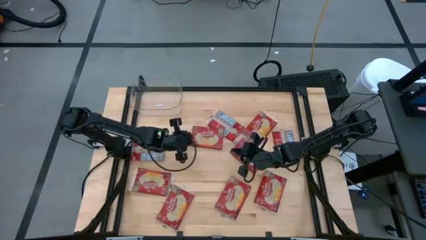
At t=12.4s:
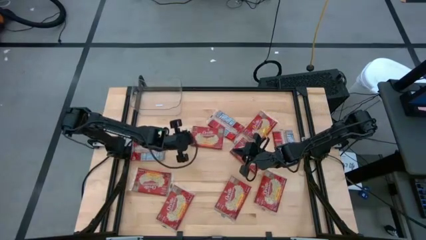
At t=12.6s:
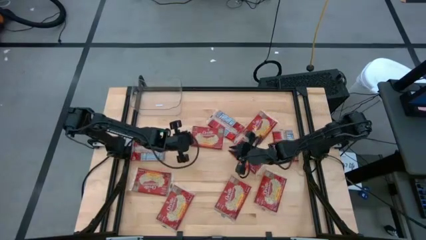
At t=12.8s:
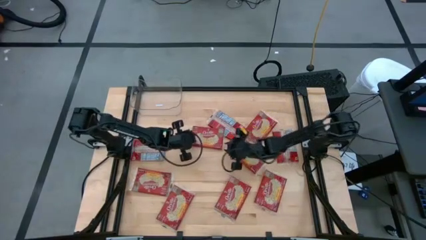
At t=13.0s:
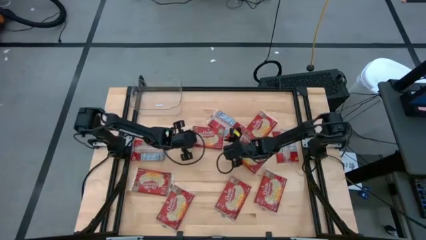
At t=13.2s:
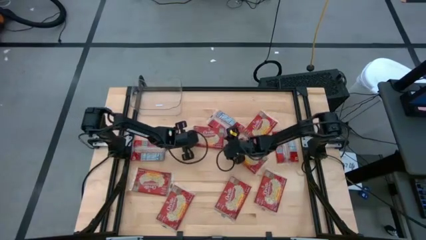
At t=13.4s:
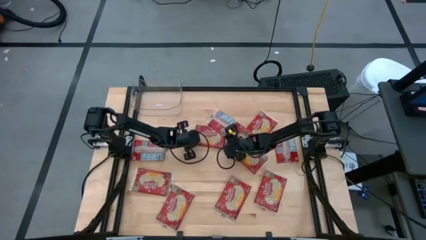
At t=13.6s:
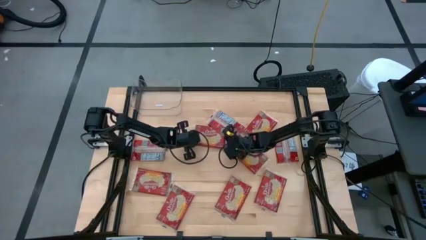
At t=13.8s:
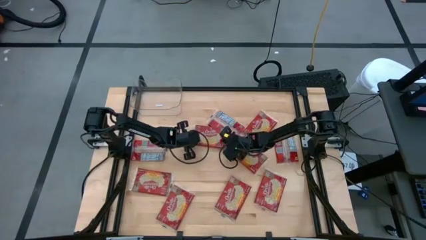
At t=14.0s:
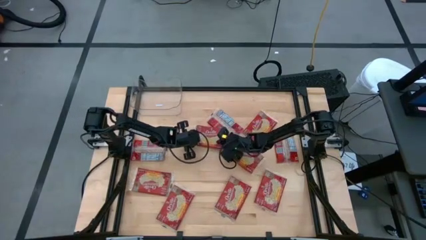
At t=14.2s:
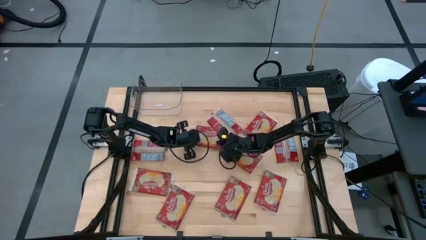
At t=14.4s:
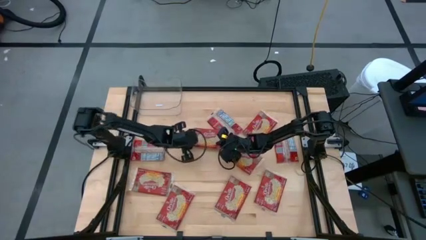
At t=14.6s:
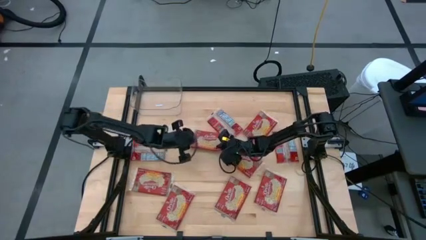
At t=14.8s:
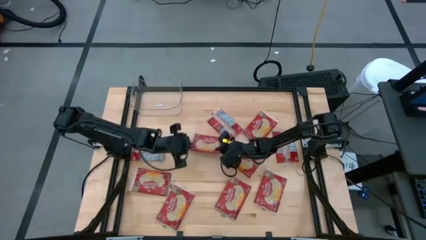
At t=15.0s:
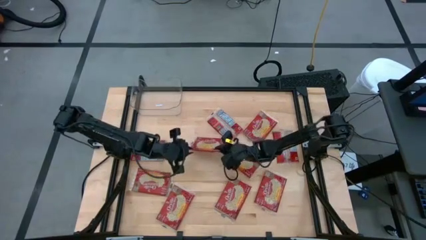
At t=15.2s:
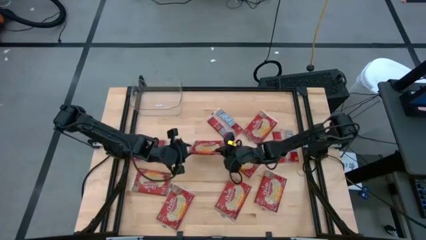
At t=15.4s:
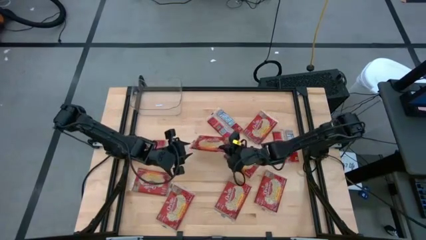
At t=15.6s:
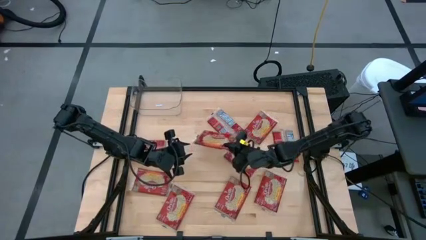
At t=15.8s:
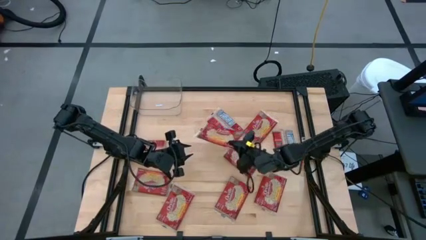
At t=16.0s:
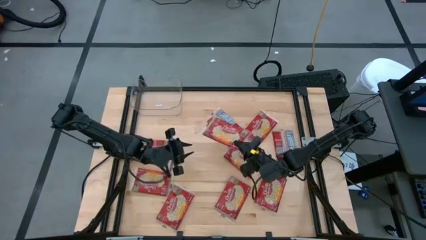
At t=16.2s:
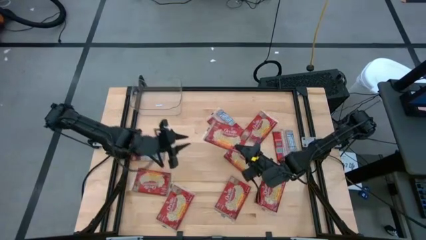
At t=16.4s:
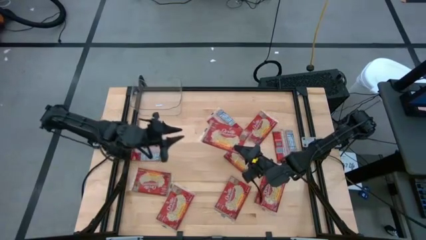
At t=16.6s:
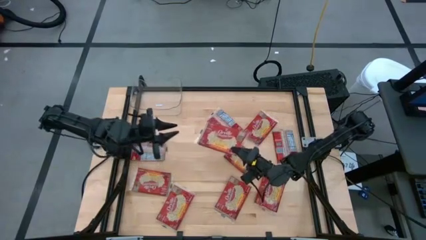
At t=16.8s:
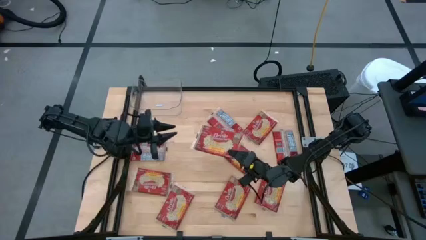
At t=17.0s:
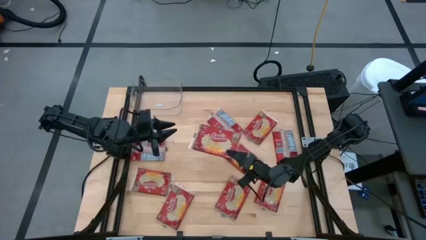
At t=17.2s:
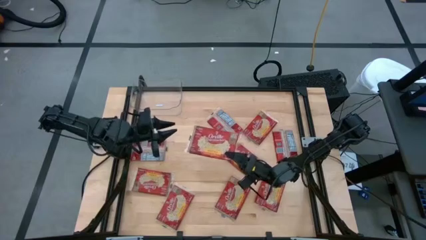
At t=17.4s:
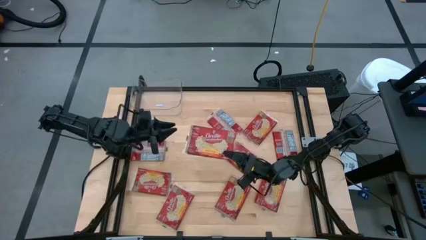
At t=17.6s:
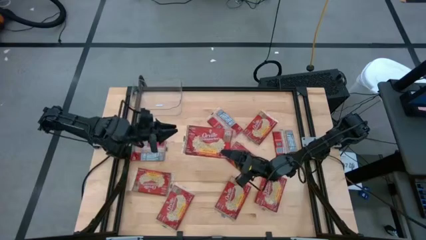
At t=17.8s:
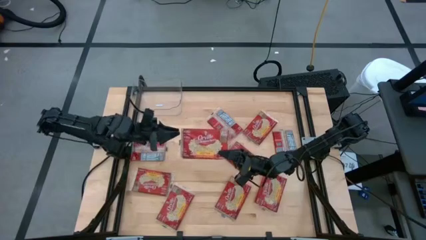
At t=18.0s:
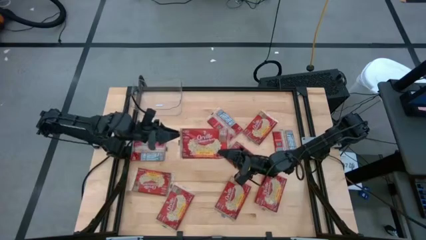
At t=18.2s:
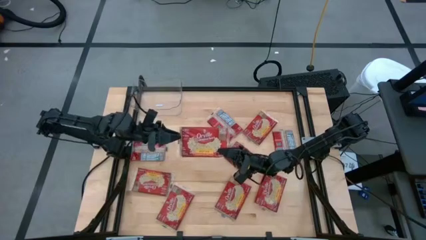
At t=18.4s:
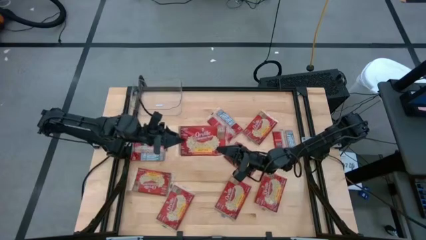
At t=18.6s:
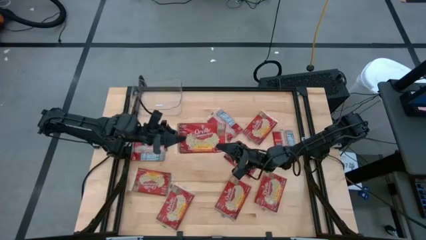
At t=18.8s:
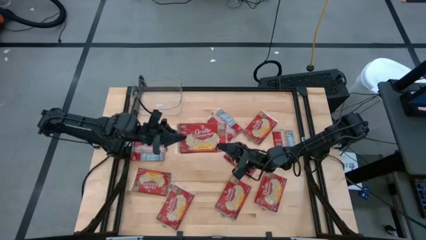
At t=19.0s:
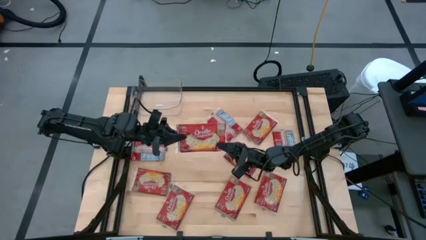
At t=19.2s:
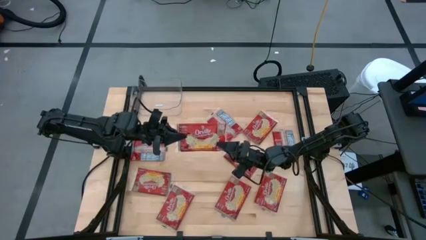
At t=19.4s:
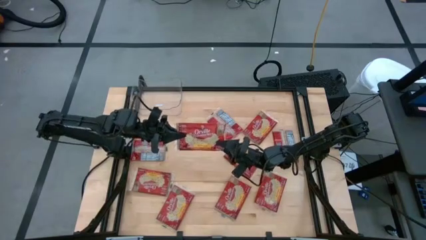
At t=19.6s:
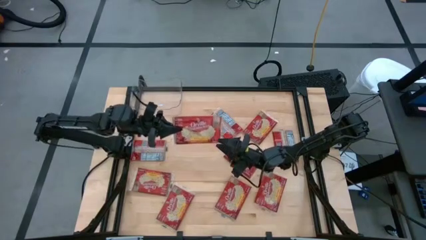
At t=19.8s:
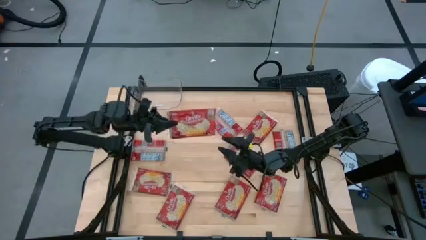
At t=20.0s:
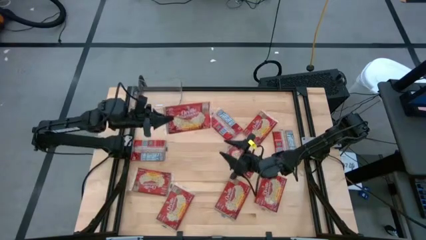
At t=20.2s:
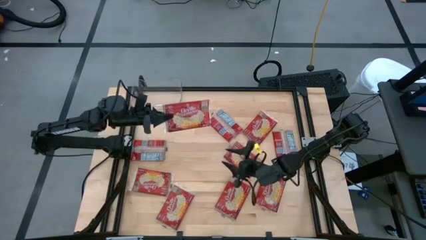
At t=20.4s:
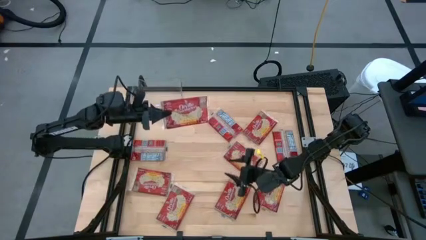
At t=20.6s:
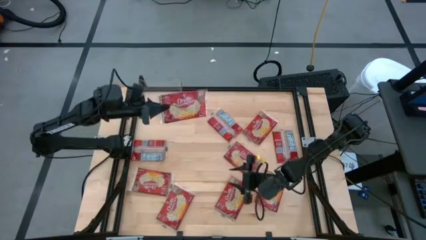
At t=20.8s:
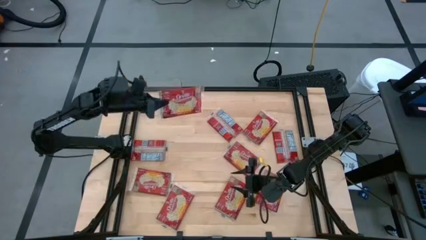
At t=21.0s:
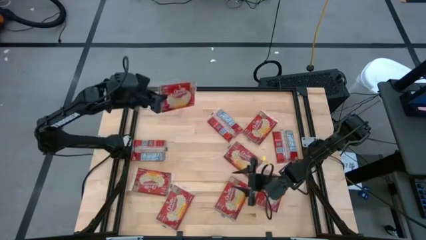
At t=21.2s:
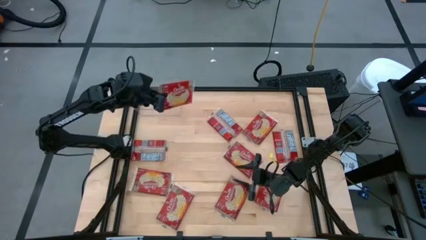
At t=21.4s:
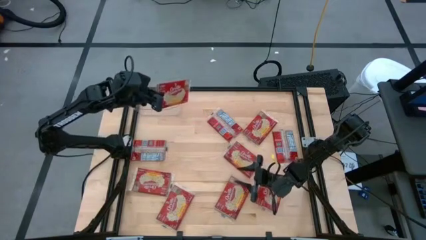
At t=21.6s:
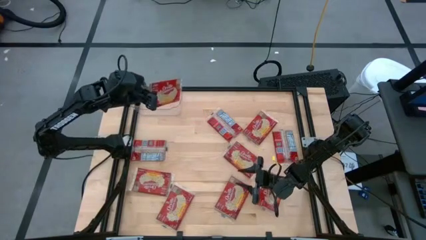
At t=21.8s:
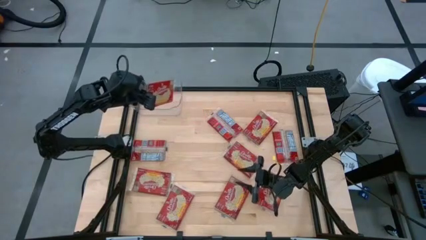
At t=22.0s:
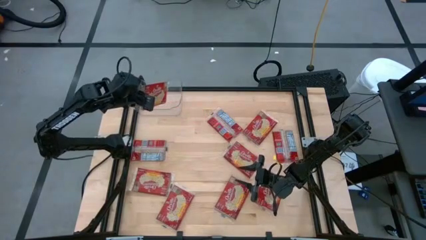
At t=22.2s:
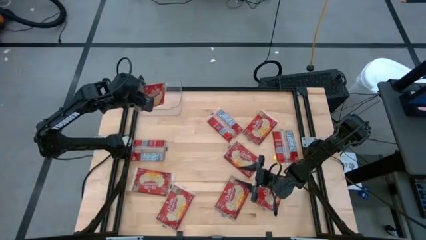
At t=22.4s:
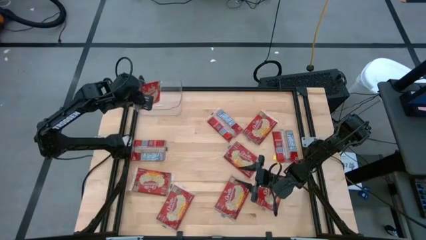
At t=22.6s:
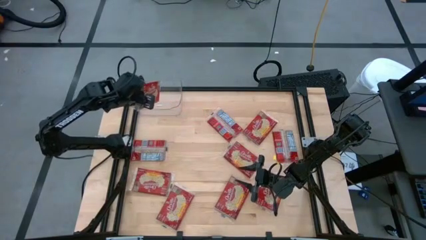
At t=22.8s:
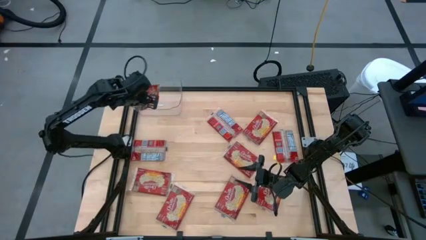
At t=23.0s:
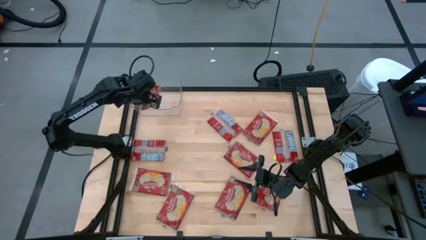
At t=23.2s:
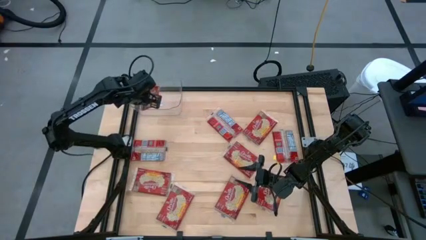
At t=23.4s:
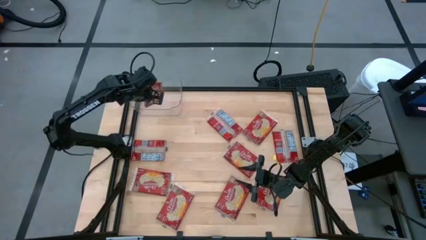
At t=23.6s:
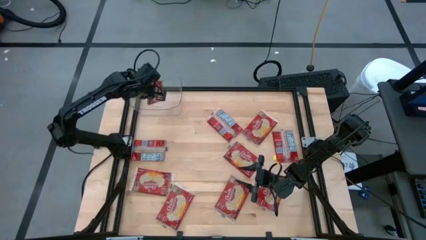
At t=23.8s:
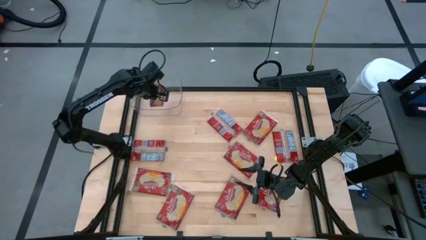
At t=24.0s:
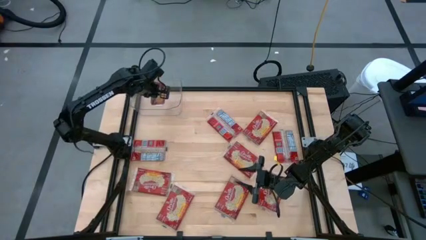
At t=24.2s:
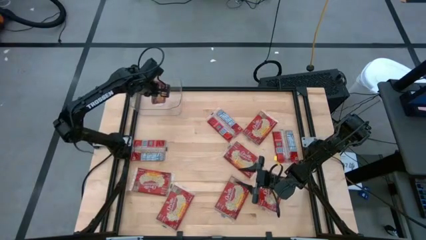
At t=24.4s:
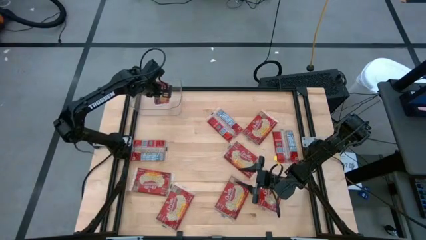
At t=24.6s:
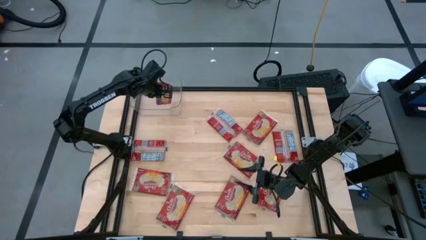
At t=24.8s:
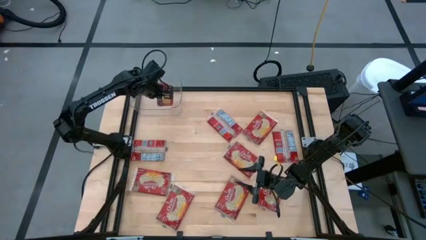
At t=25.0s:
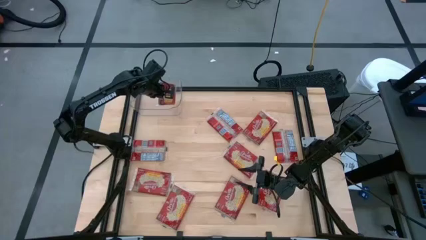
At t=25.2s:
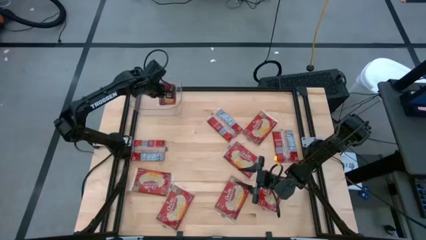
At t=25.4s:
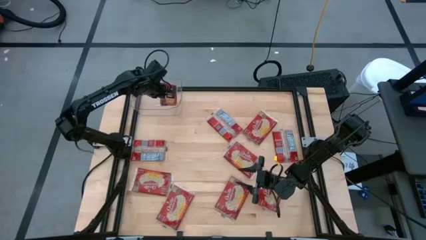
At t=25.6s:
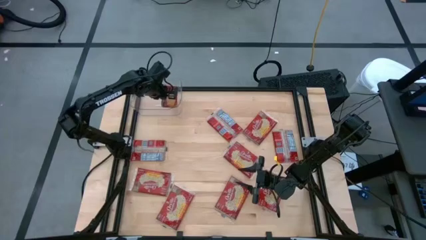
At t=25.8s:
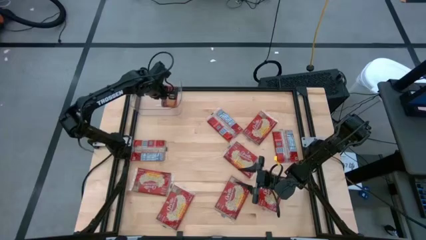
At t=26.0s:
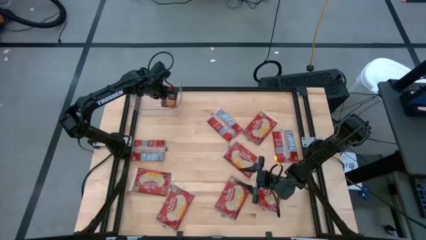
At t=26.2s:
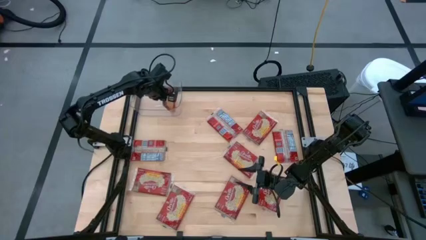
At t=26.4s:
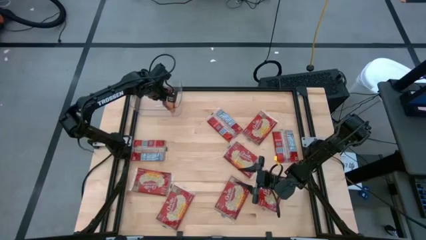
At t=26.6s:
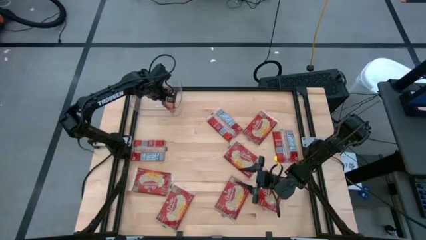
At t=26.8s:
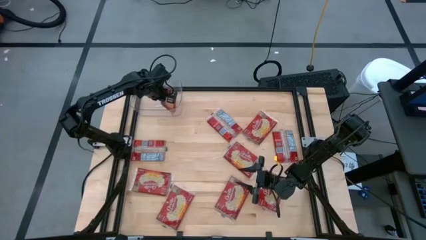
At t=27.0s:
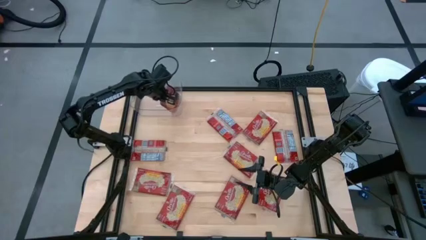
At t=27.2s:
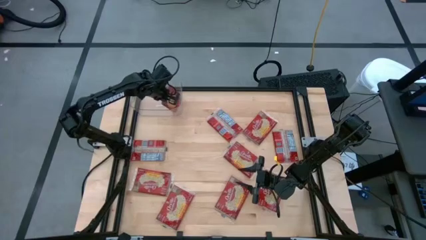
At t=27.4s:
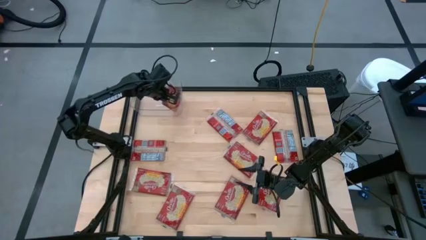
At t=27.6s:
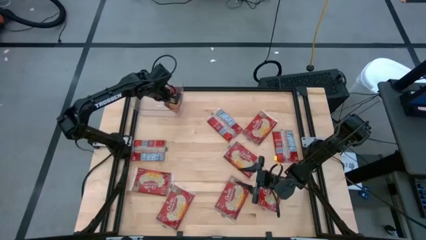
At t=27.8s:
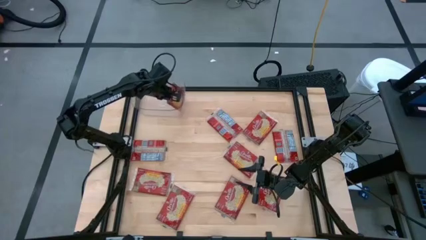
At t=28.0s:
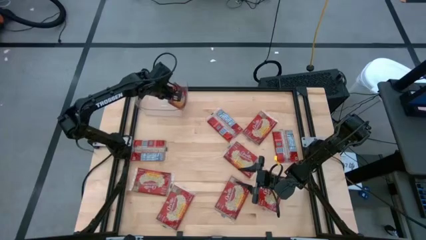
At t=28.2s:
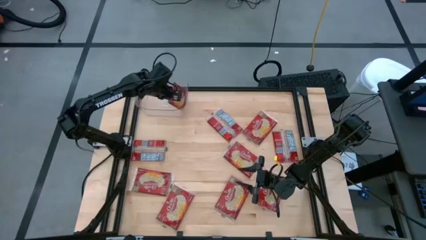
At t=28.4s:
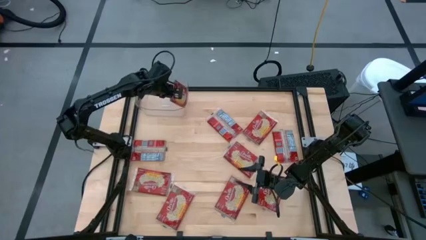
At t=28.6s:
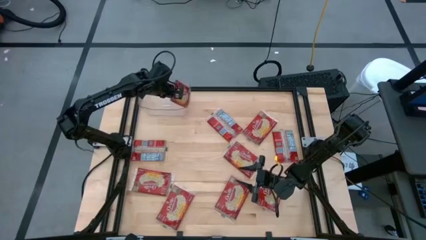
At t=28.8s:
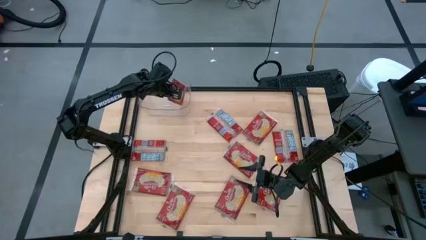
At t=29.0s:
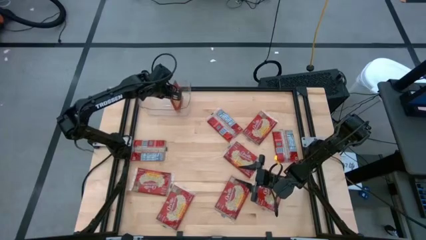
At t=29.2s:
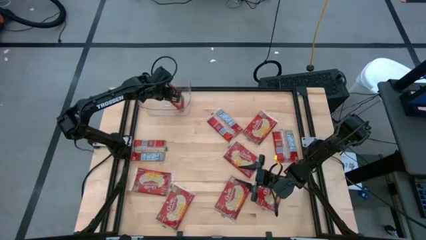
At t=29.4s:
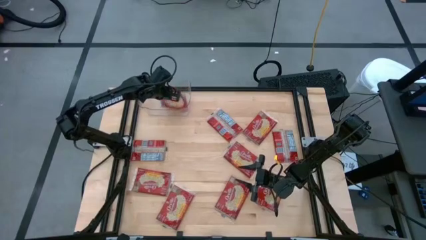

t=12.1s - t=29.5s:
Task: Sort popcorn bags into baskets
Put the red popcorn bag into the transparent bin
